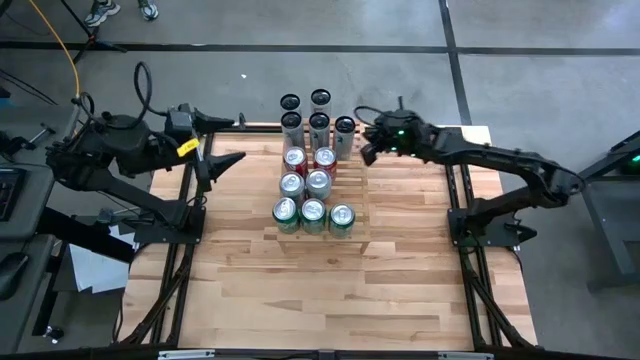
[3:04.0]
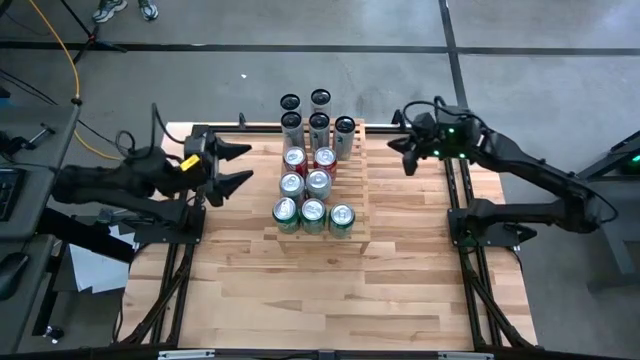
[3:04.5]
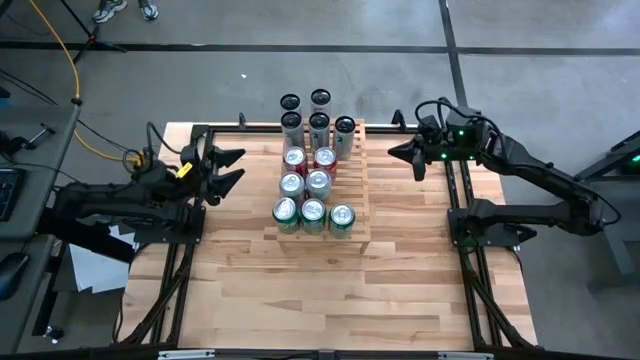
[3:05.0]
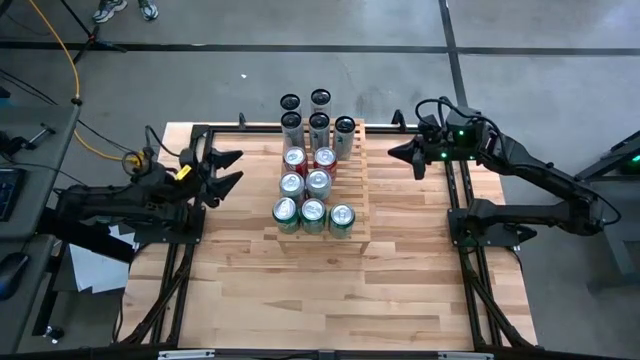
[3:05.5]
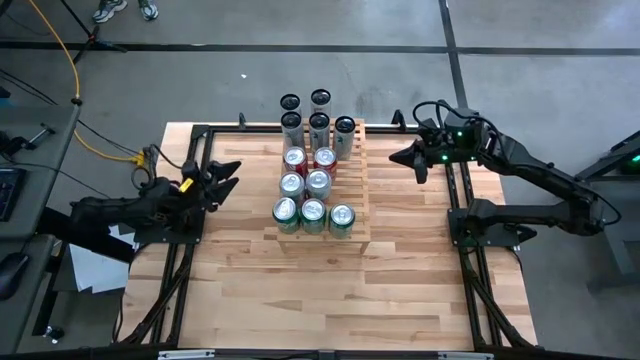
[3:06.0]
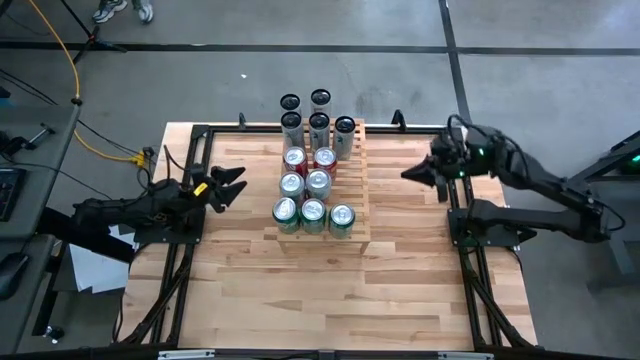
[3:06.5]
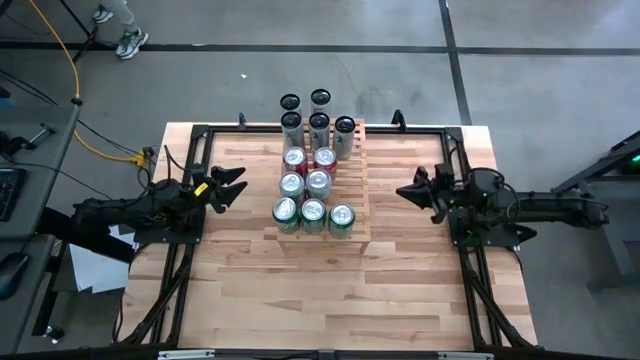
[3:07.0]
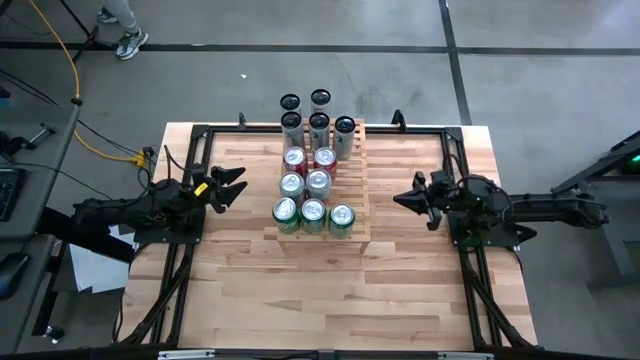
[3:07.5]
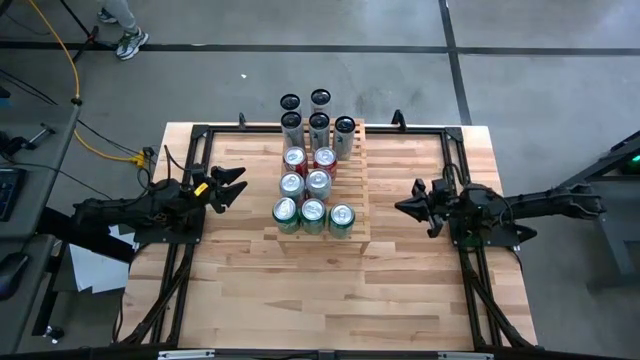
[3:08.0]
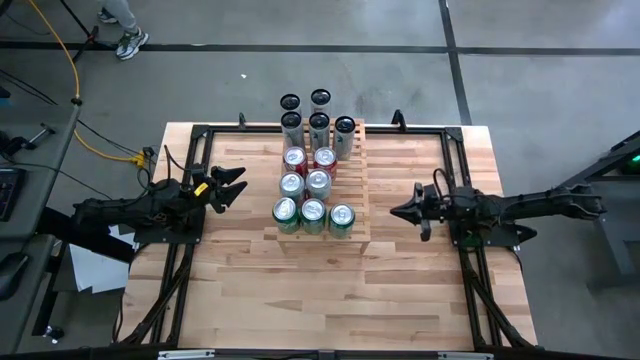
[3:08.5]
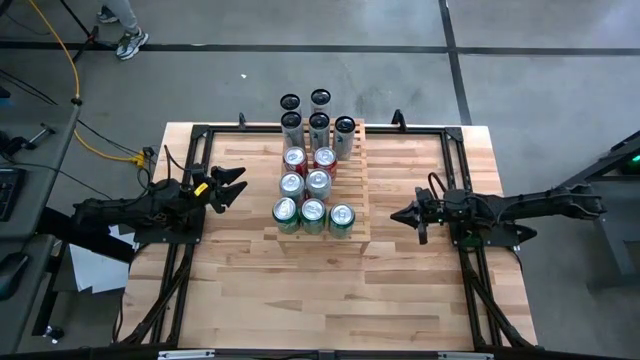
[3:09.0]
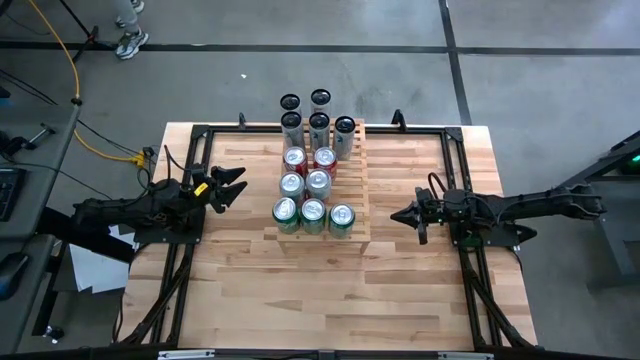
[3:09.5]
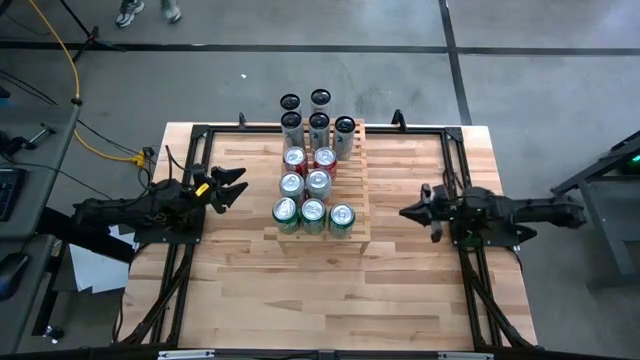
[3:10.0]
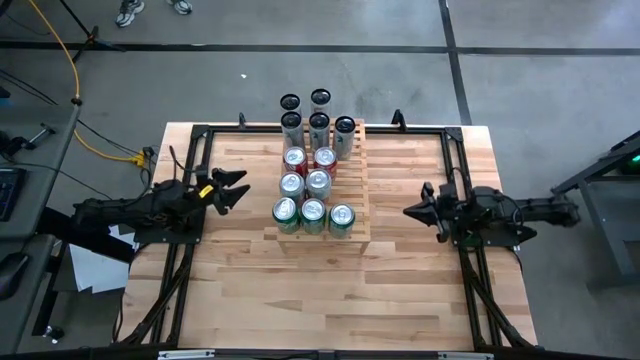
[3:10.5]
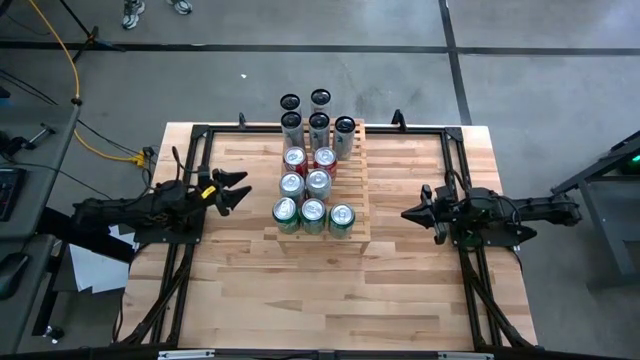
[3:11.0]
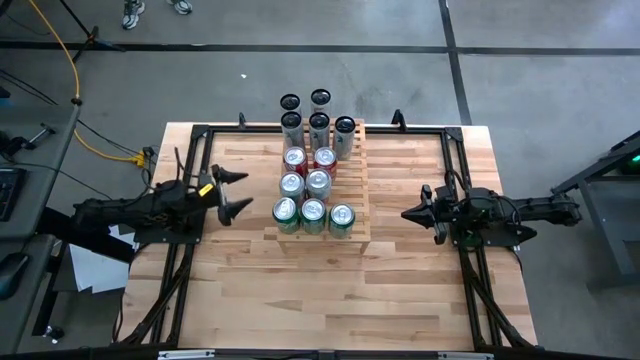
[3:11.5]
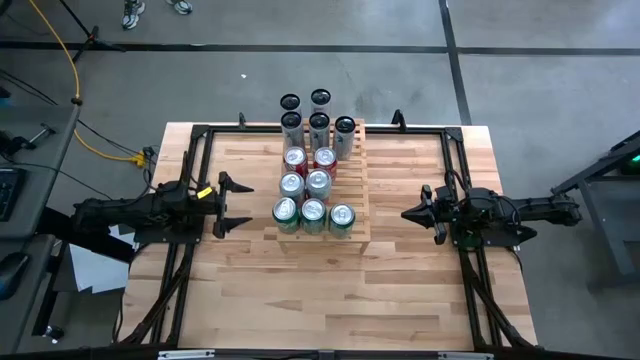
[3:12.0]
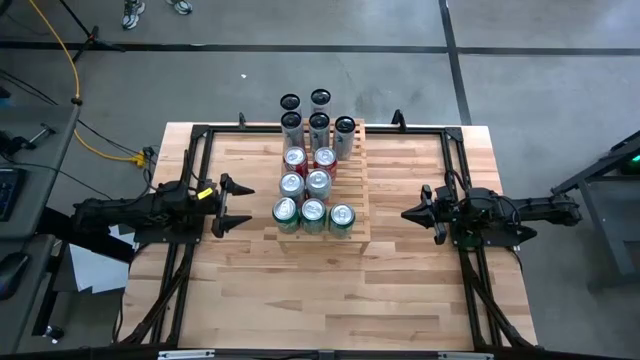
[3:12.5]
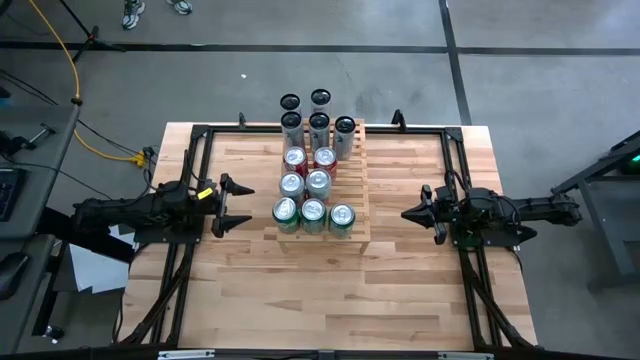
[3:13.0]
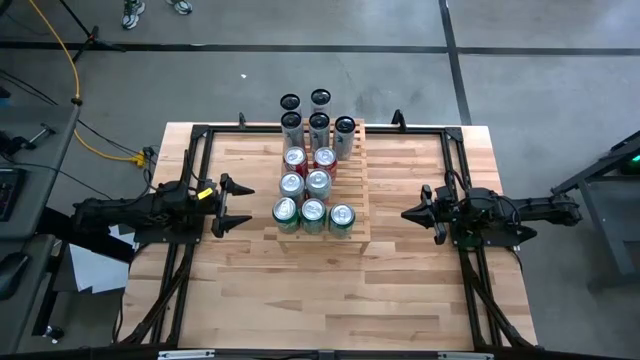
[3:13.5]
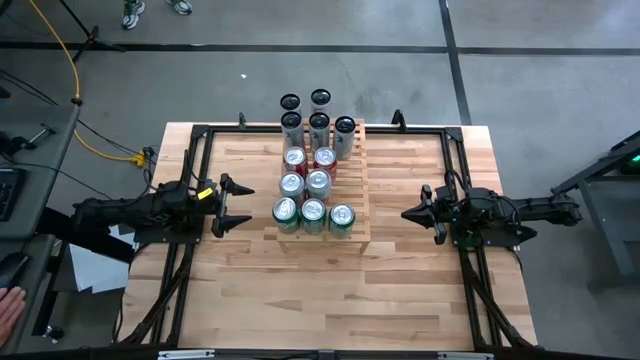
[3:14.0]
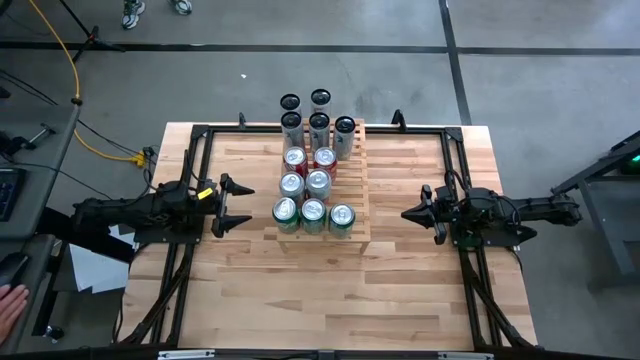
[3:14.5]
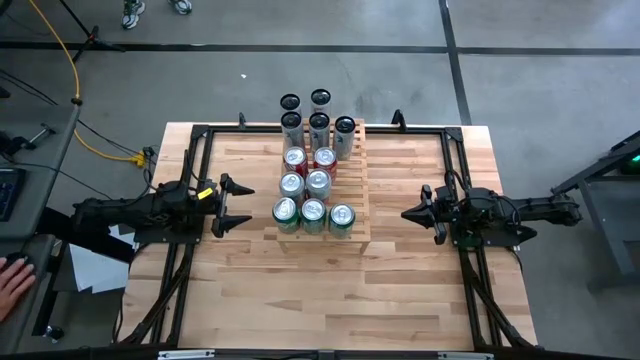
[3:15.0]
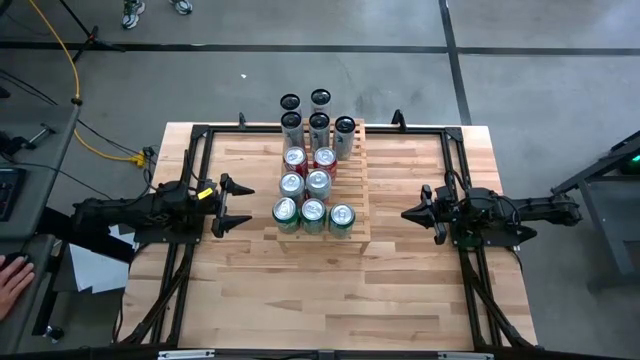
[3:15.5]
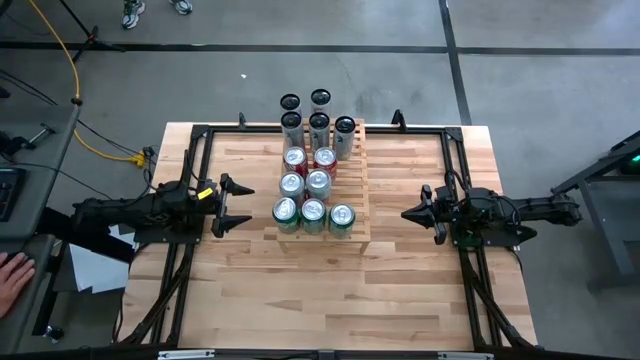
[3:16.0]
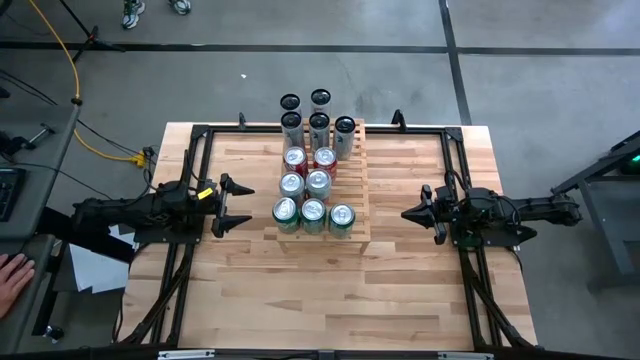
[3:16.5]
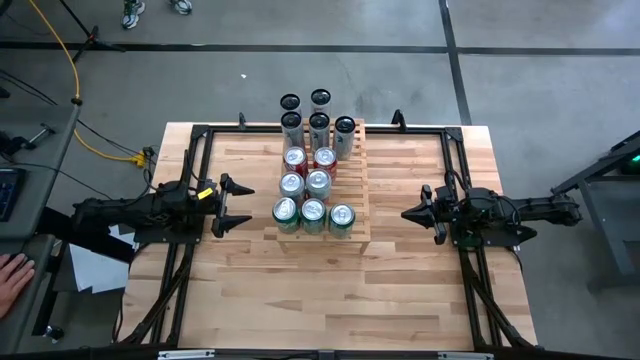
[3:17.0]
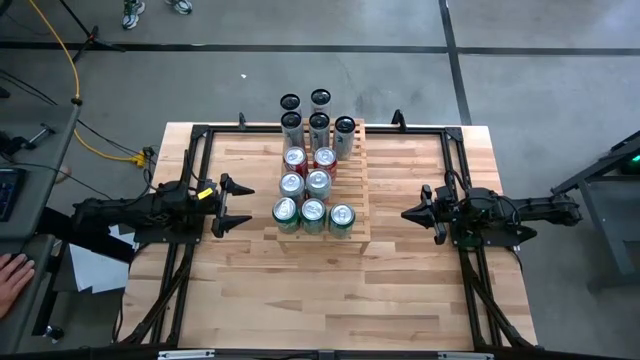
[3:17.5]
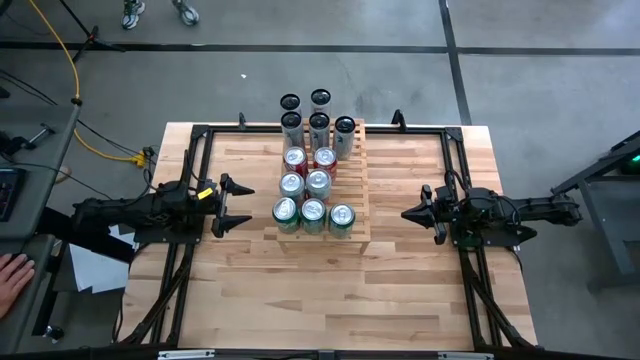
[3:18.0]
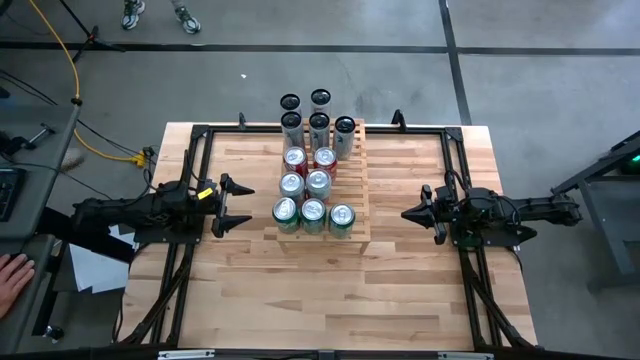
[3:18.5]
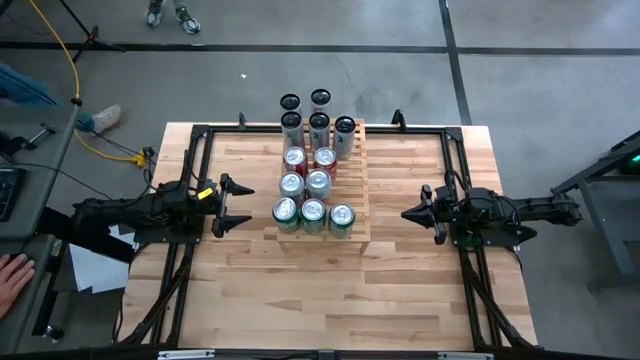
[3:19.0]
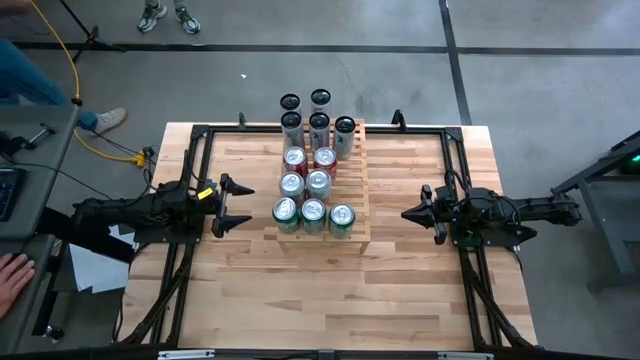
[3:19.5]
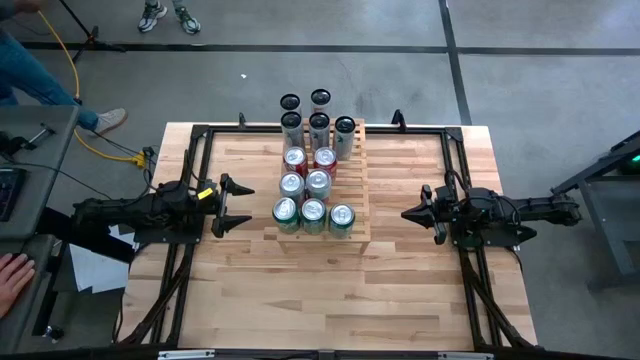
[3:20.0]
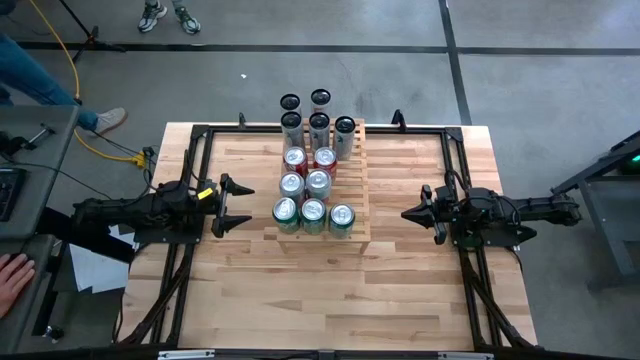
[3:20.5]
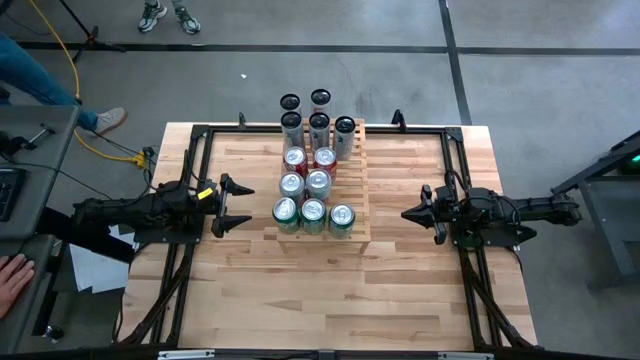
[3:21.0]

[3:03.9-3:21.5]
Task: Place canned beverage on shelf
Return to Home Position

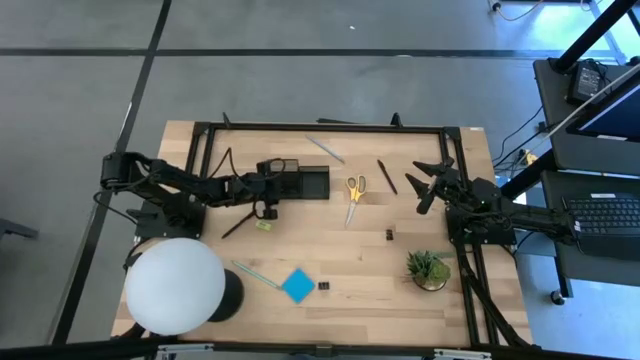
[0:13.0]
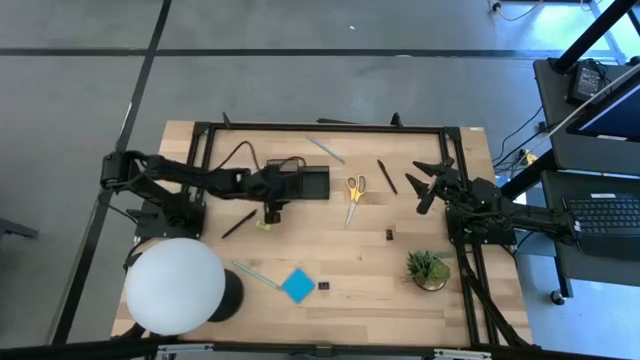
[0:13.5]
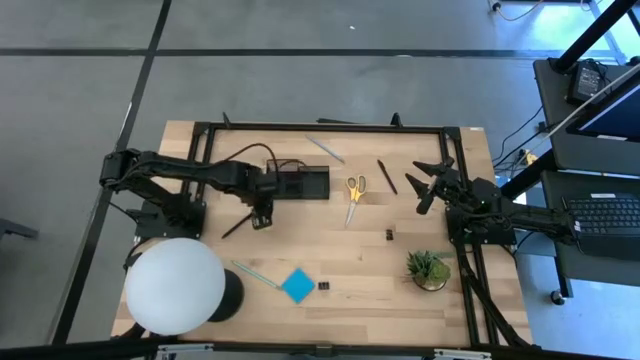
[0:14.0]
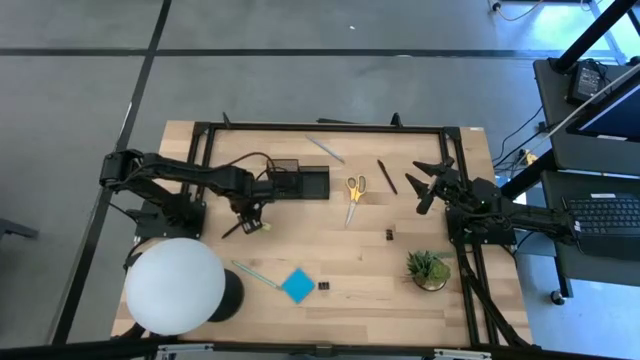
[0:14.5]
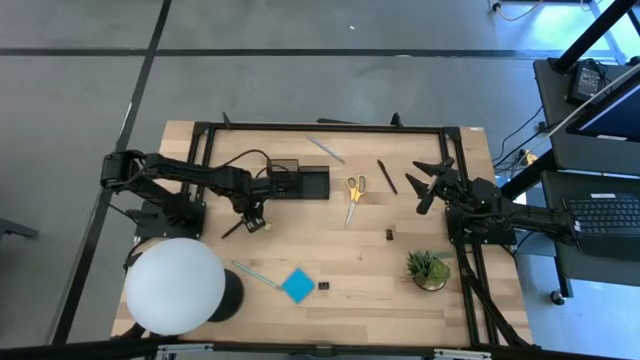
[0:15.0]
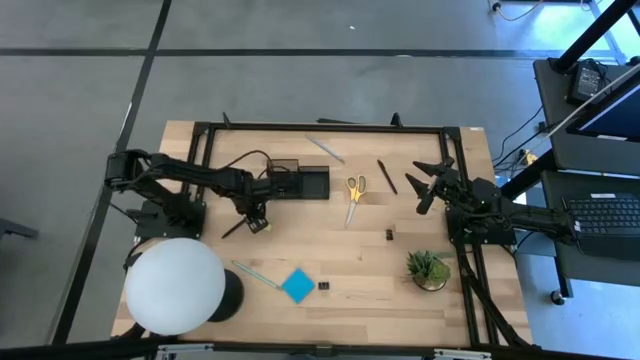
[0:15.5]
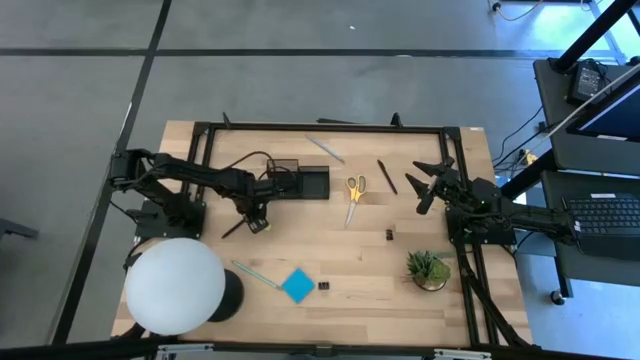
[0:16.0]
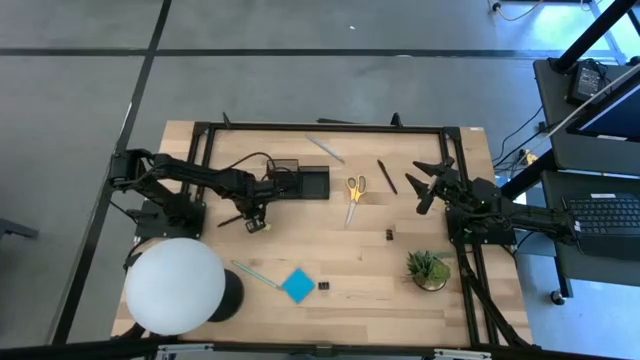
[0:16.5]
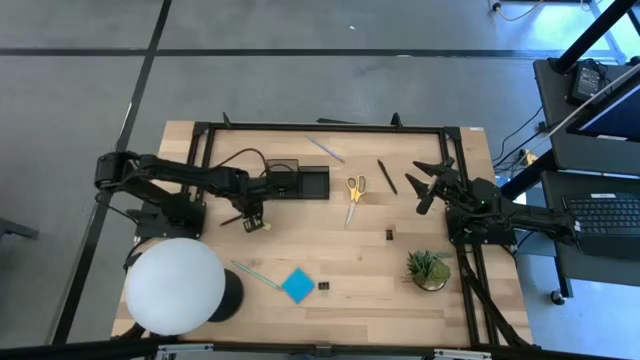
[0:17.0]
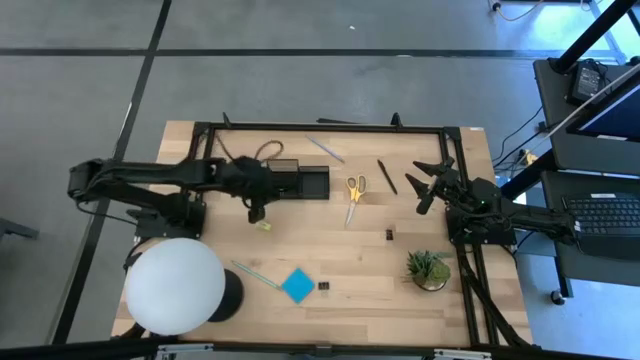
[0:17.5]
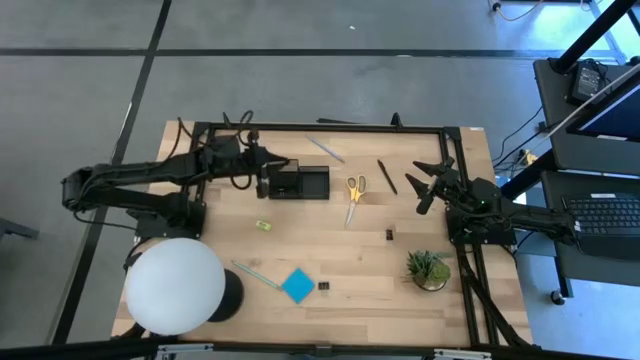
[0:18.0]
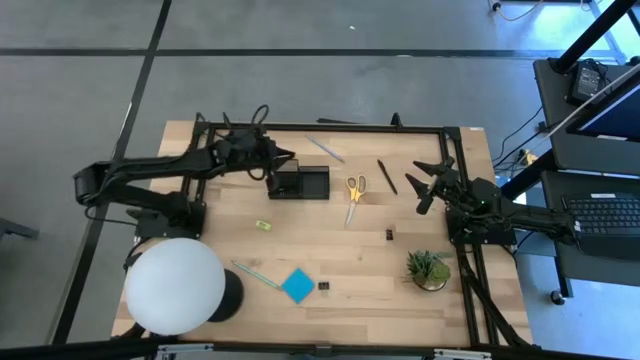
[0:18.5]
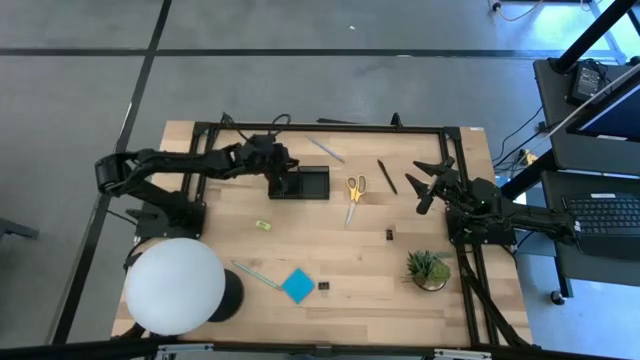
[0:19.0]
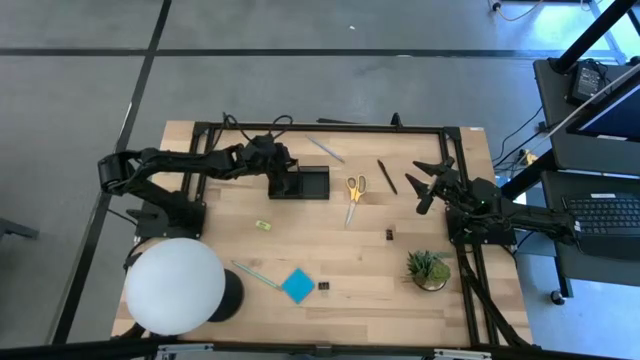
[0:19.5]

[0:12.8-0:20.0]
Task: Pick and place office supplies into organizer
Put the left black pen into the black desk organizer
